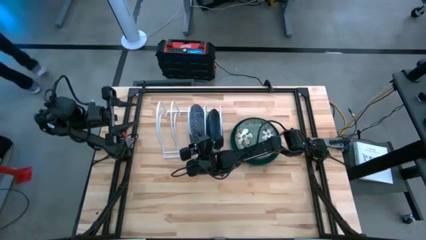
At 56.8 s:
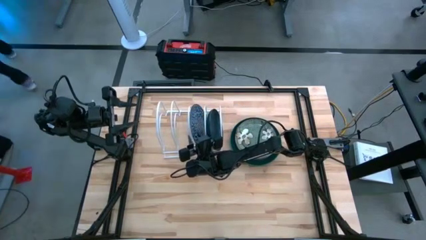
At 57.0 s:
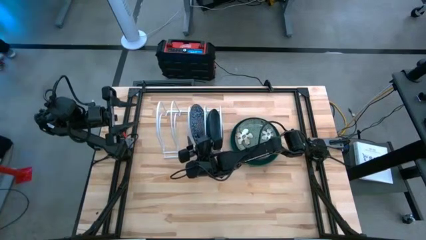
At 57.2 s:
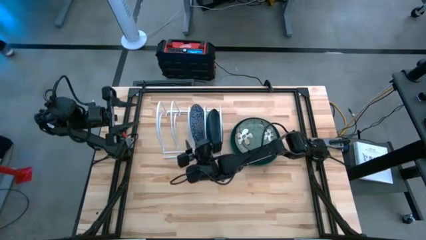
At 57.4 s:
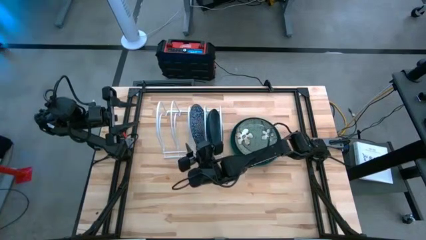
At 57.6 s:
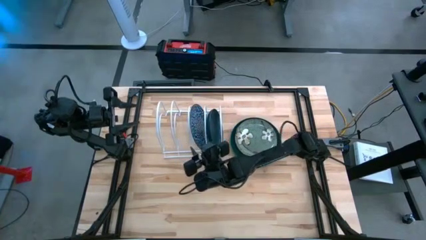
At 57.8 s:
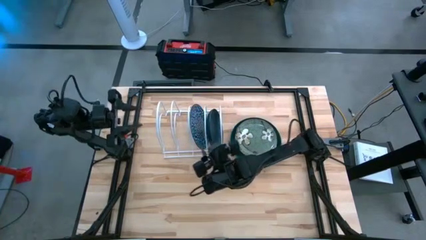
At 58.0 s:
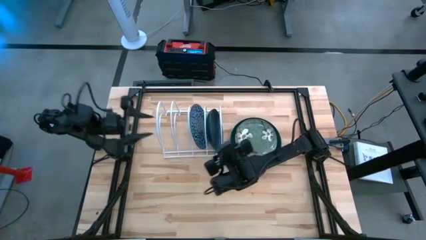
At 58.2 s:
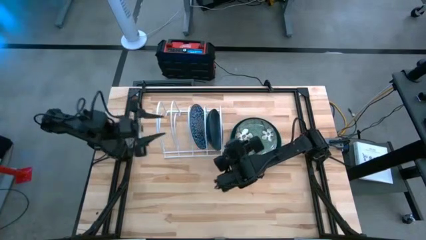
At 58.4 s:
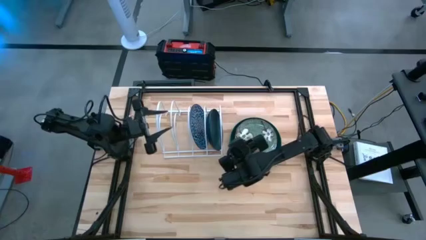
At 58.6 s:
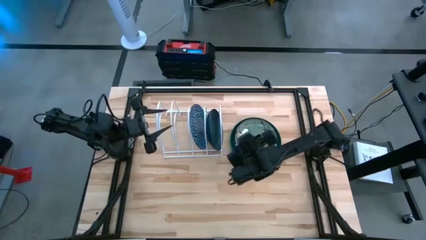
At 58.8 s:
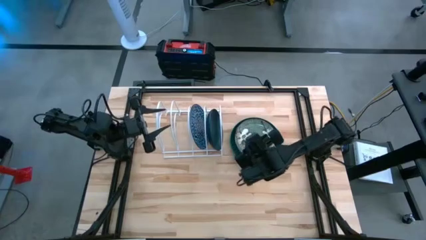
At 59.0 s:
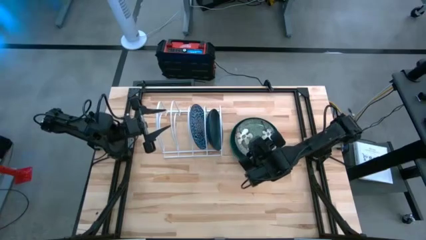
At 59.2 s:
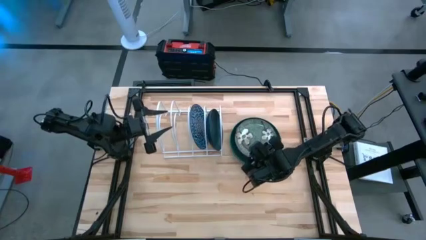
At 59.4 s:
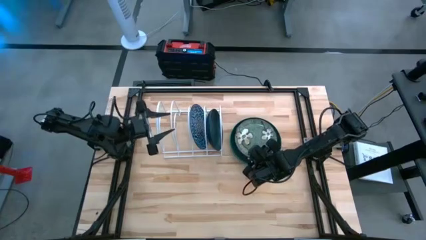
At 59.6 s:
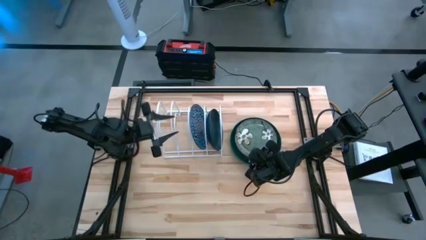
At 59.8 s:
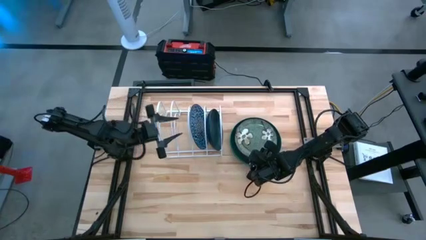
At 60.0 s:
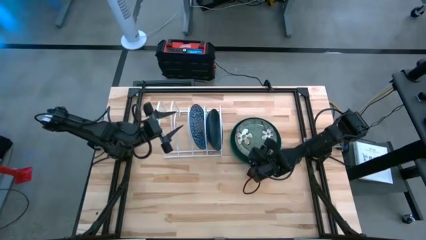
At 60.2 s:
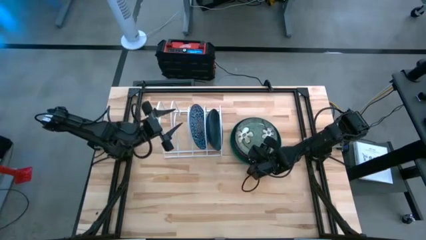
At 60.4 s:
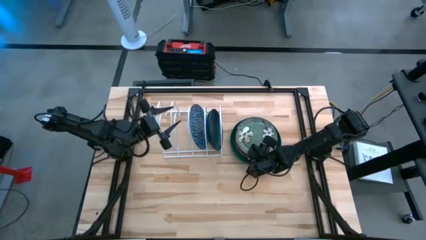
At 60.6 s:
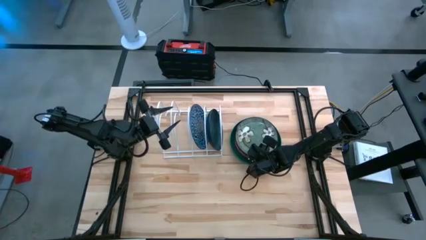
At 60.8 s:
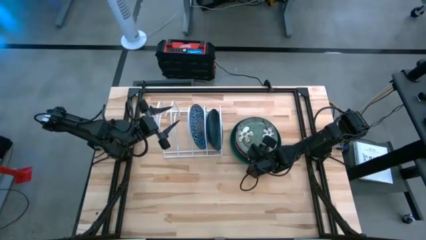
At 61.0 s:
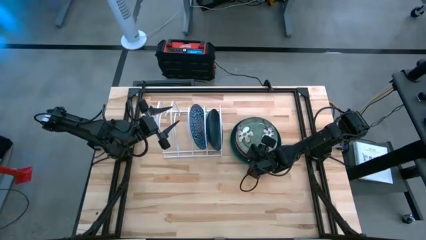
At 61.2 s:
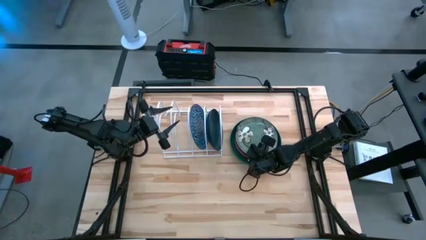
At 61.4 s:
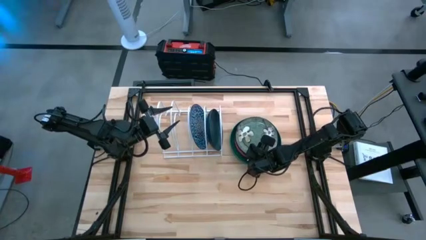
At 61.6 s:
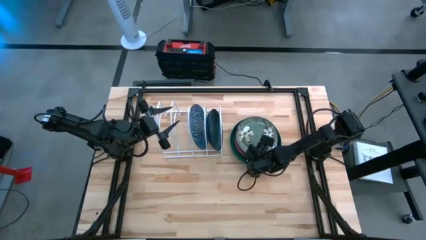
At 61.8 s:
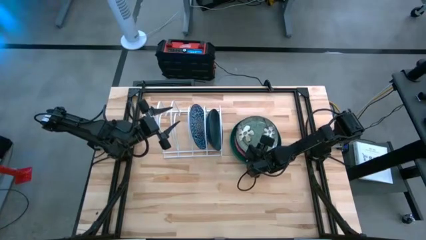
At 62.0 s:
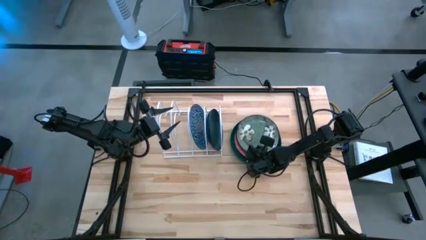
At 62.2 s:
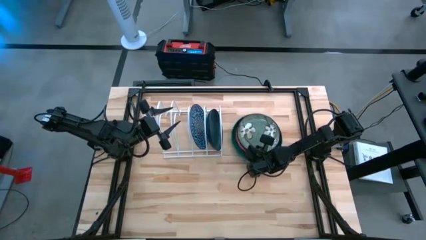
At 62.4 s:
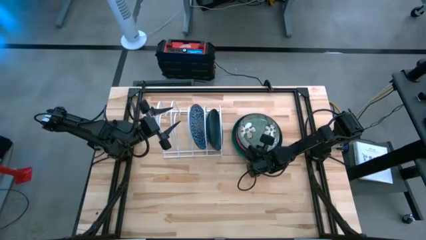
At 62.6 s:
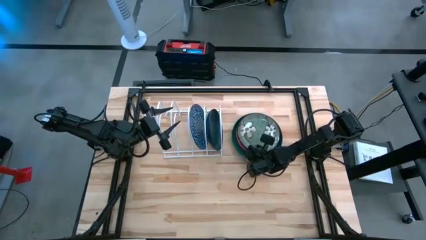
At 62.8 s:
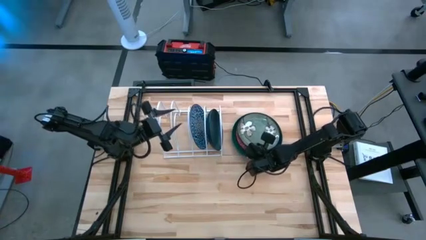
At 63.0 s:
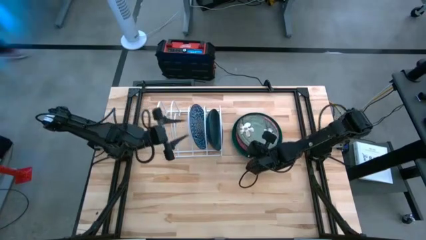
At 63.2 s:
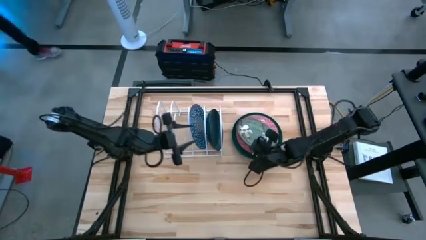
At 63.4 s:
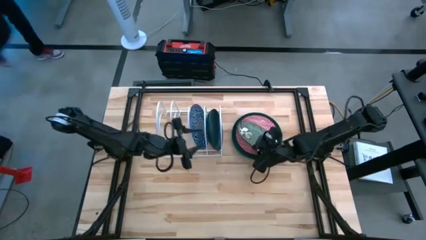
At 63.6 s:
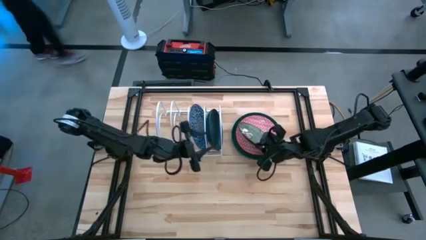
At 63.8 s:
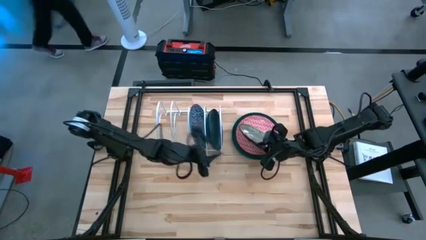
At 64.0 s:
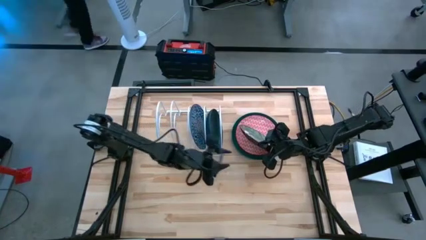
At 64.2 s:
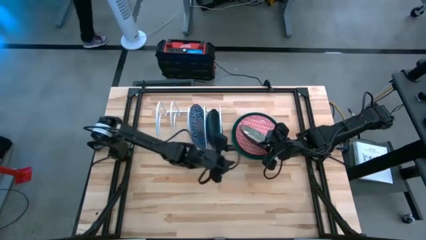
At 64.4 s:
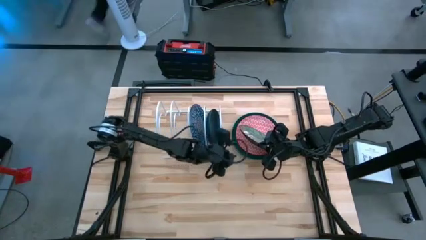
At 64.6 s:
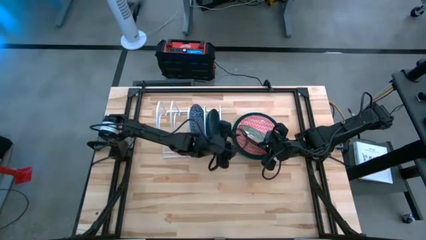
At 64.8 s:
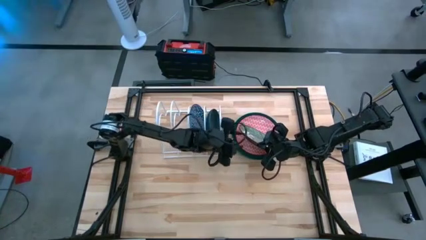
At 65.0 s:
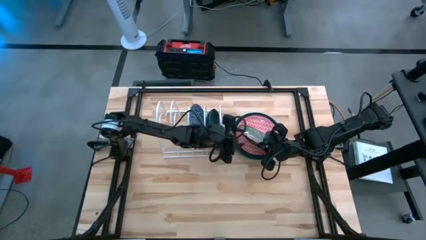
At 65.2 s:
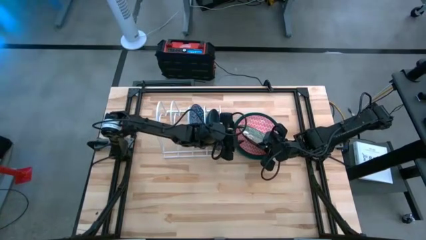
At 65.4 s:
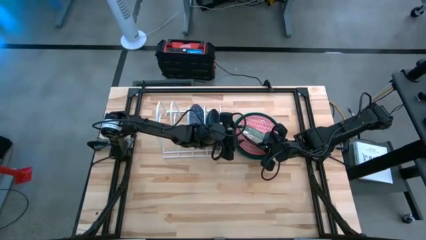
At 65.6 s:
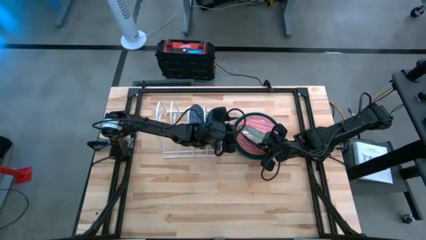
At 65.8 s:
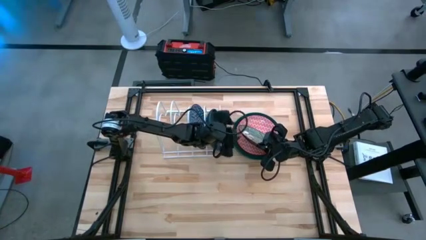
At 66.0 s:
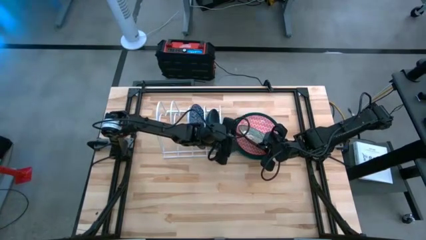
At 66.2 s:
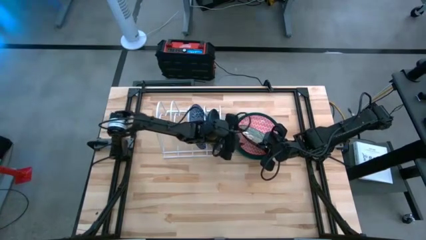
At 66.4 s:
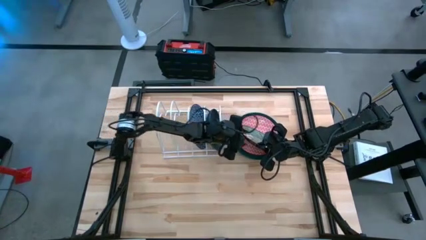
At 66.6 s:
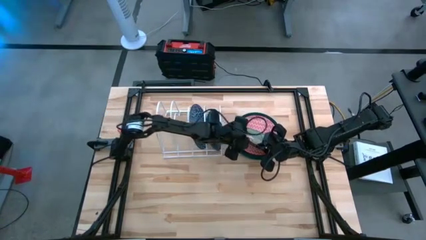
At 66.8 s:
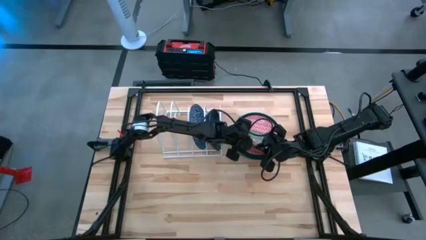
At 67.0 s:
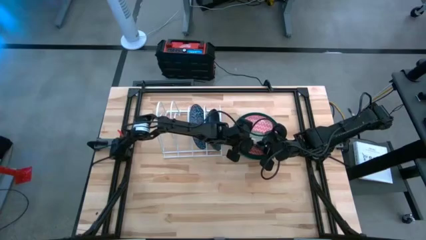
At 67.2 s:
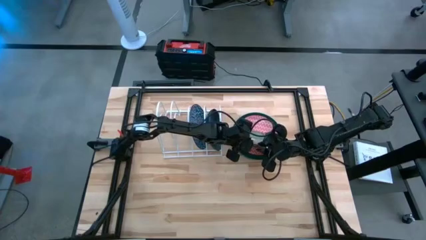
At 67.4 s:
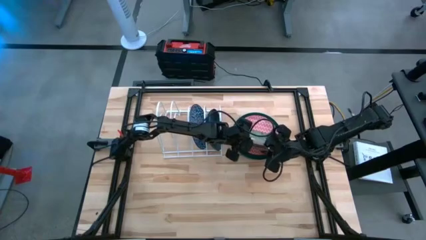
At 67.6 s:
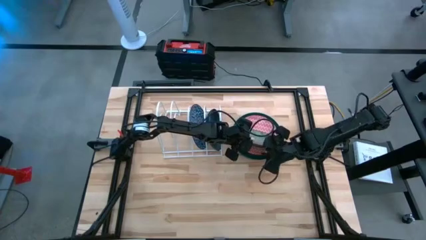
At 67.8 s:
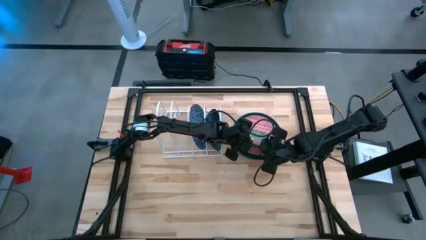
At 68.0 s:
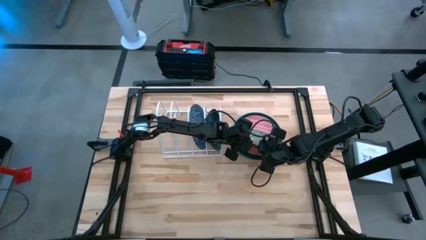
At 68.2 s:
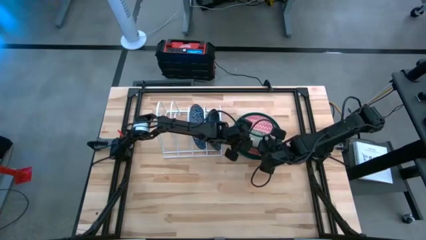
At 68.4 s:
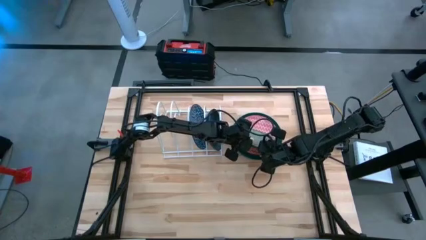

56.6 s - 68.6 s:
Task: Sort dishes
Put the green patterned plate into the dish rack

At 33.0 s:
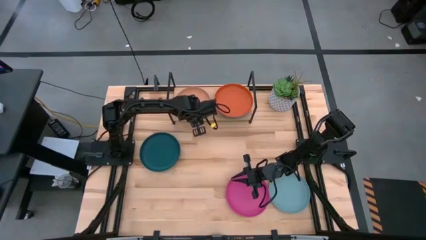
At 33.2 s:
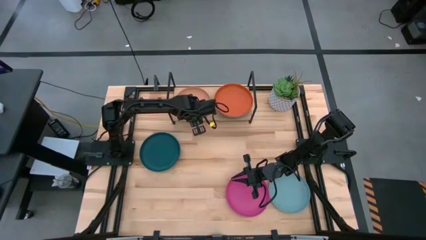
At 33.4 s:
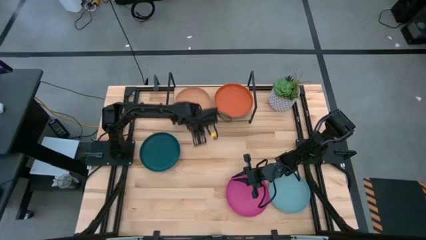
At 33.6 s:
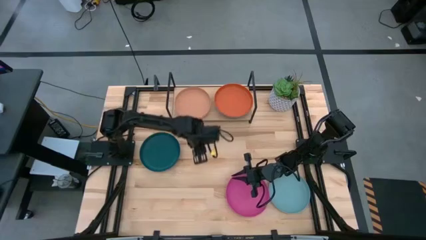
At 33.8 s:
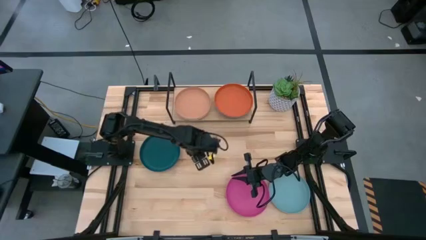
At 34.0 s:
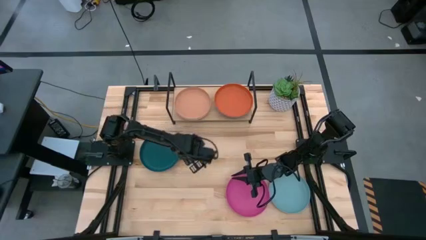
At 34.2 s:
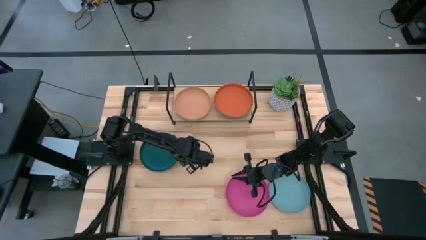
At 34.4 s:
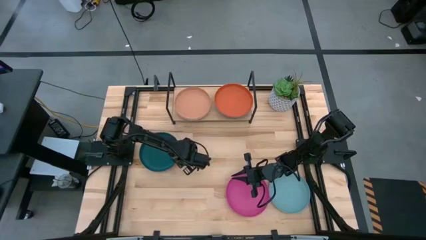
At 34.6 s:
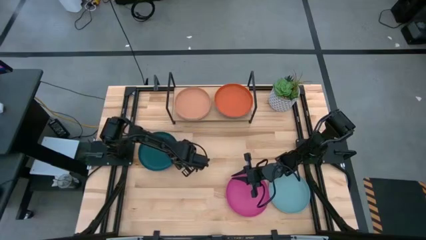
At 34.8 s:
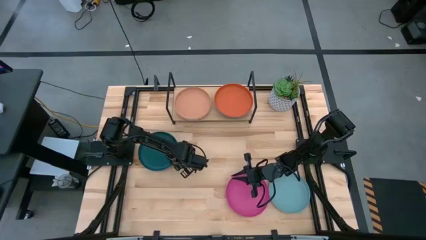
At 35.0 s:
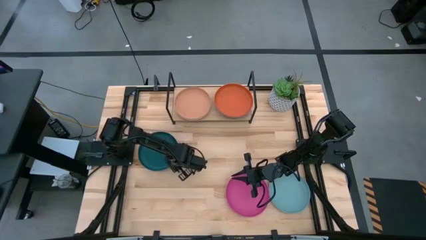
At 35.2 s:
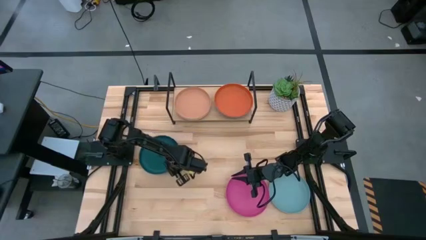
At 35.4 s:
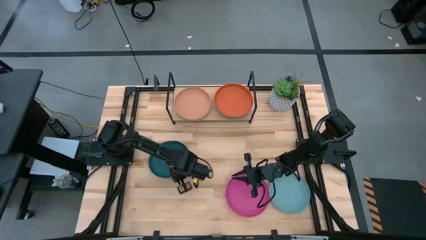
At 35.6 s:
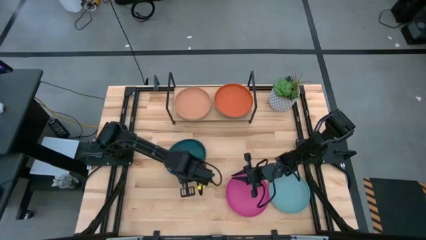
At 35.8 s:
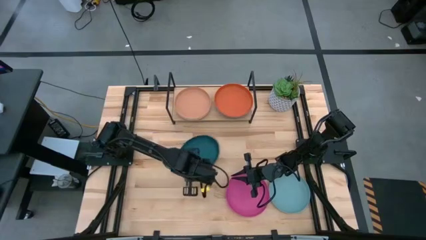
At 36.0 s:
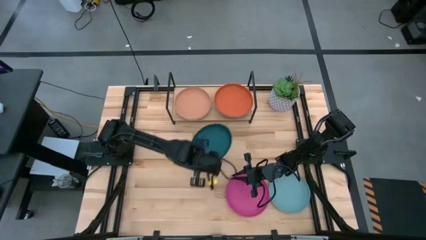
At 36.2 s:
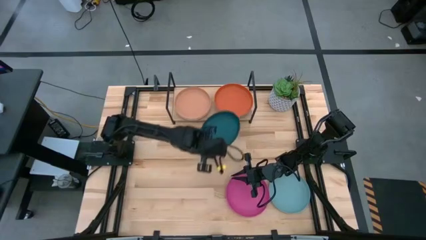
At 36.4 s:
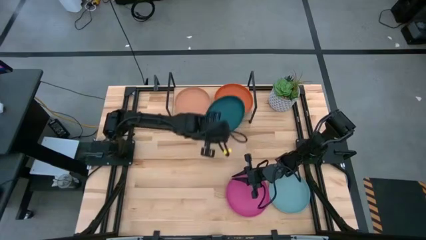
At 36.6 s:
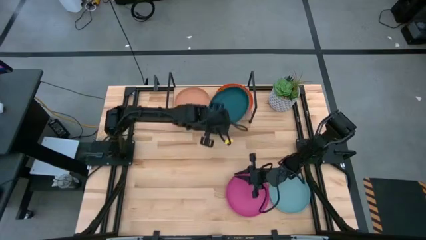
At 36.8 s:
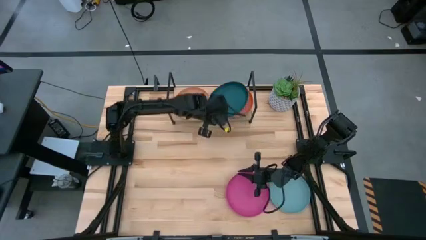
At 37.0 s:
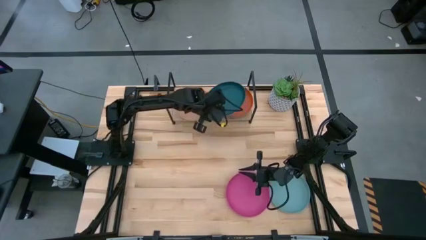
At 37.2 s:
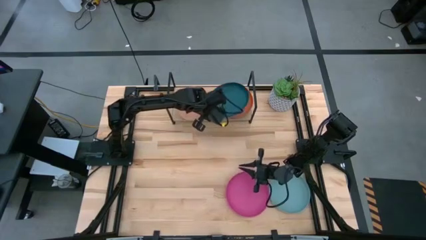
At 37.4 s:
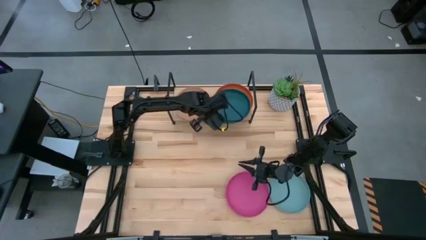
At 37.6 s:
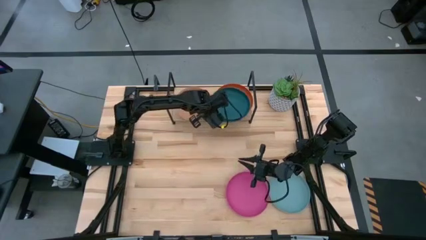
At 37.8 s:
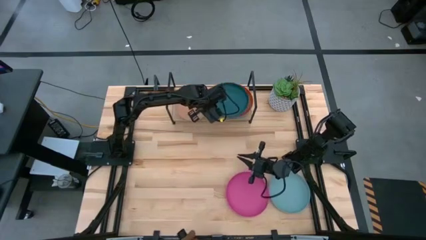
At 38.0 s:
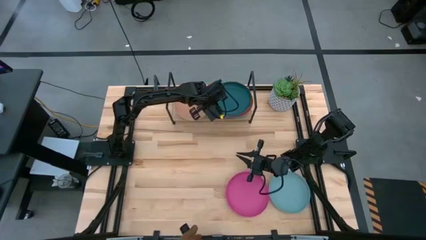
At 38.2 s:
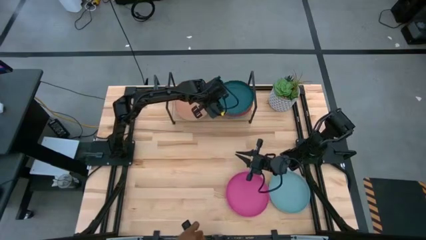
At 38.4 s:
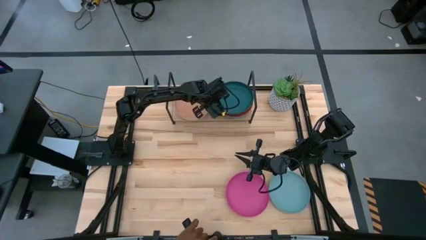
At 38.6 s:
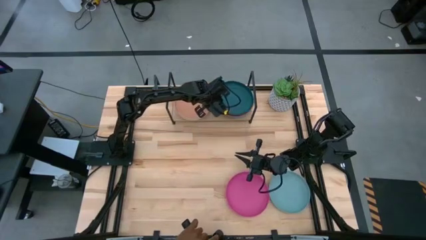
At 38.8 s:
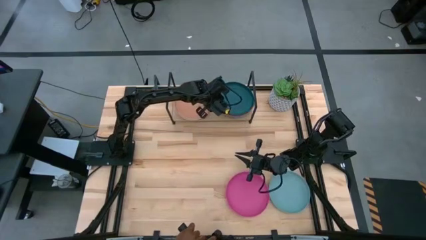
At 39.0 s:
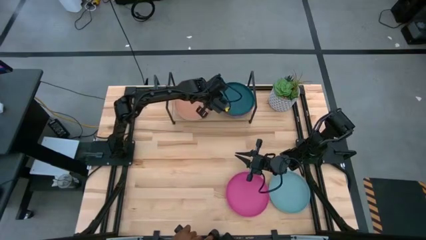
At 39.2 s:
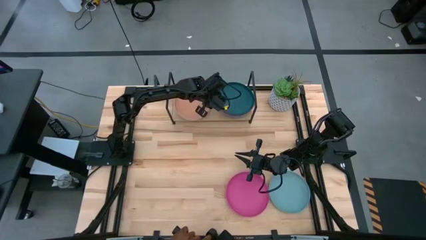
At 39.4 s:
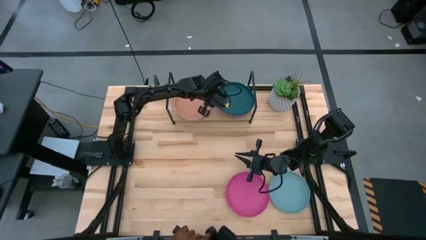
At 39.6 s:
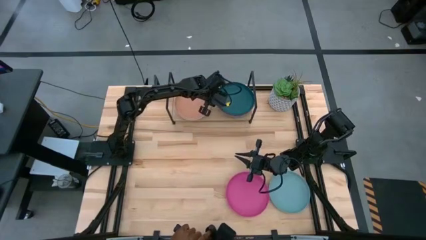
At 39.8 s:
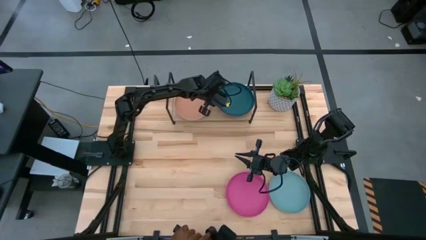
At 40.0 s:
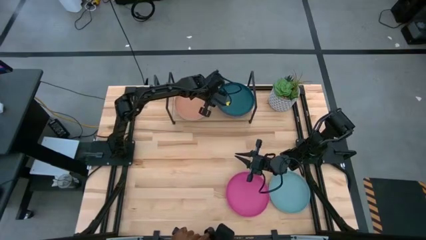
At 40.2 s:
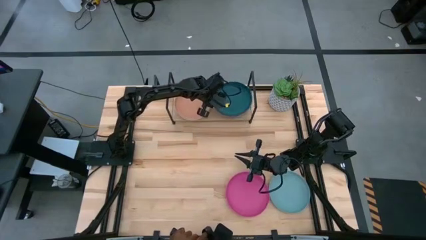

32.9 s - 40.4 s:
Task: Place and stack plates onto a shelf
Stack the green plate on top of the the orange plate on the shelf
